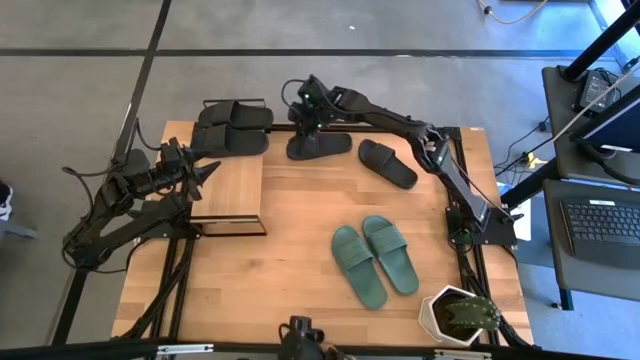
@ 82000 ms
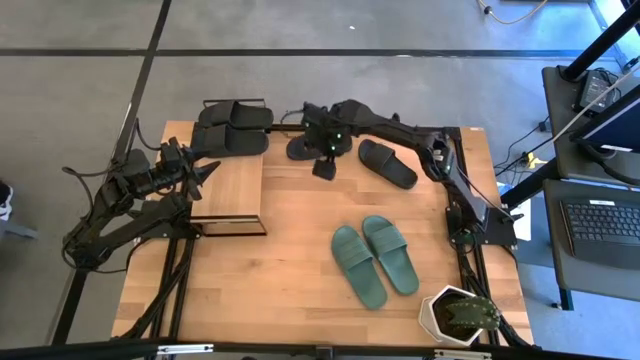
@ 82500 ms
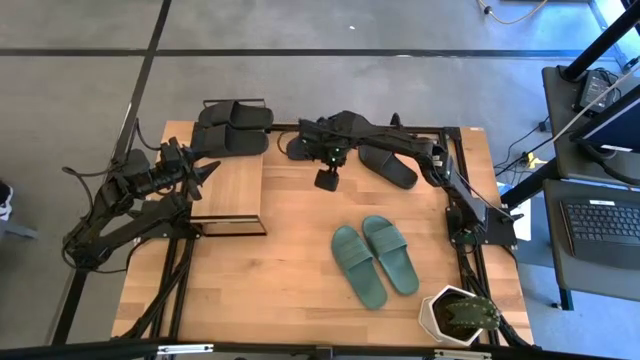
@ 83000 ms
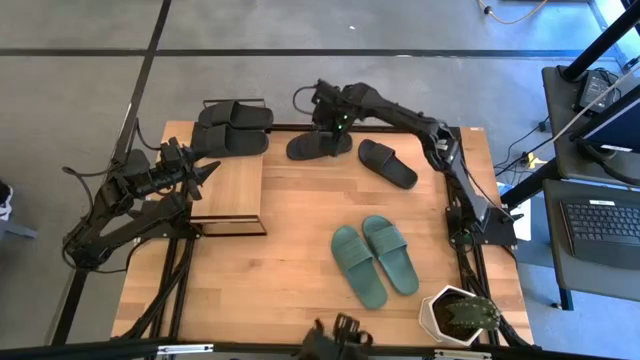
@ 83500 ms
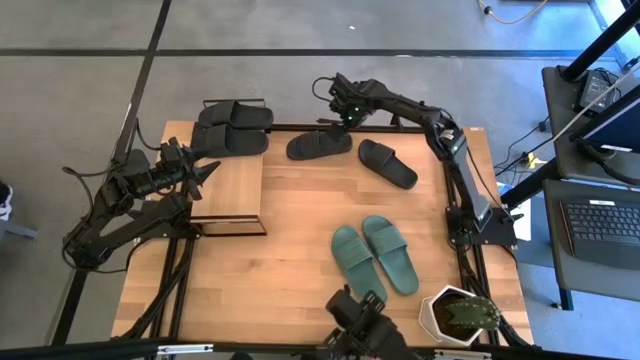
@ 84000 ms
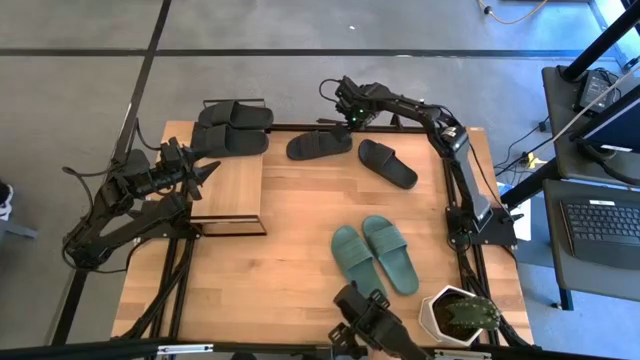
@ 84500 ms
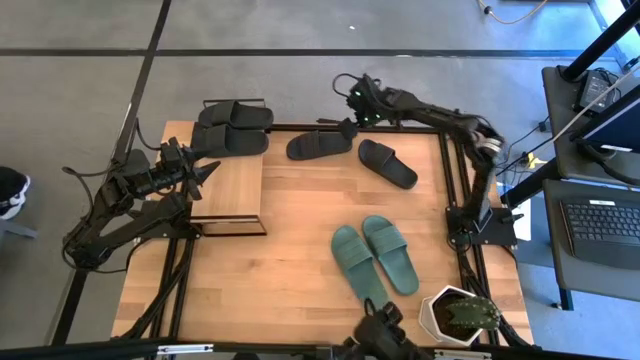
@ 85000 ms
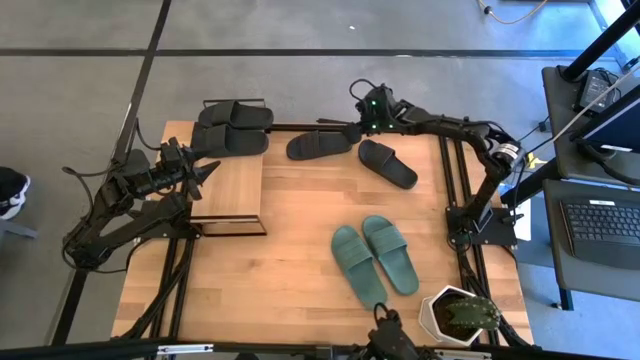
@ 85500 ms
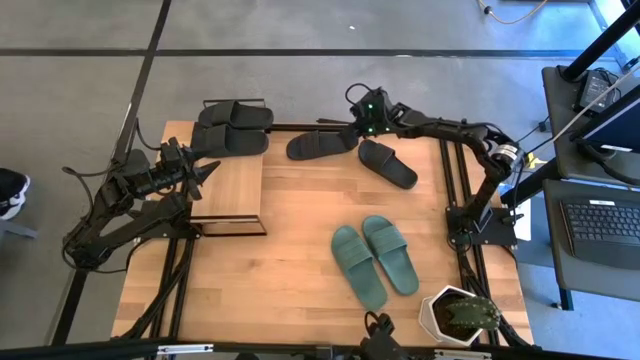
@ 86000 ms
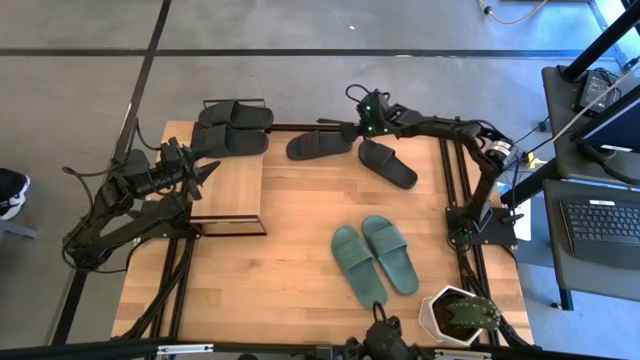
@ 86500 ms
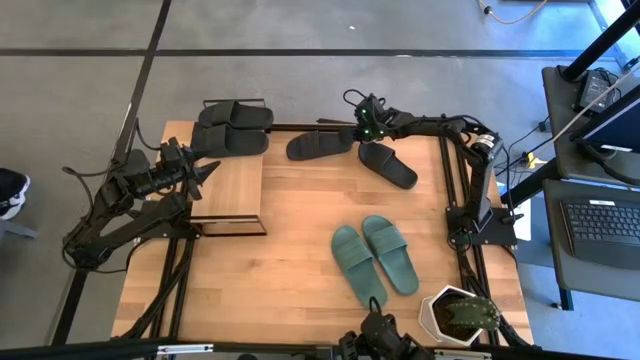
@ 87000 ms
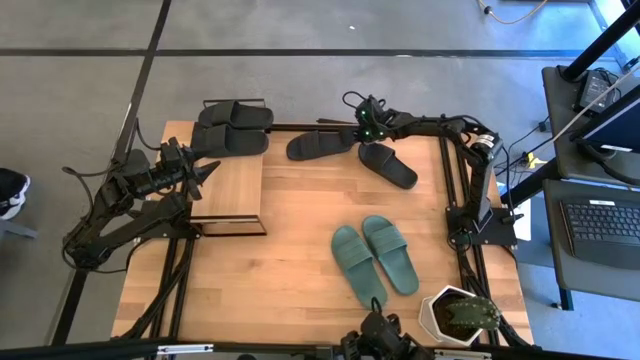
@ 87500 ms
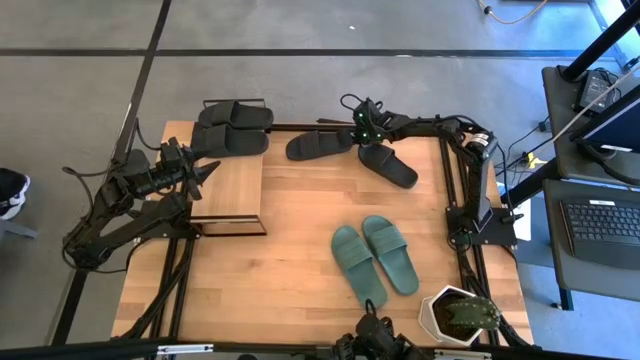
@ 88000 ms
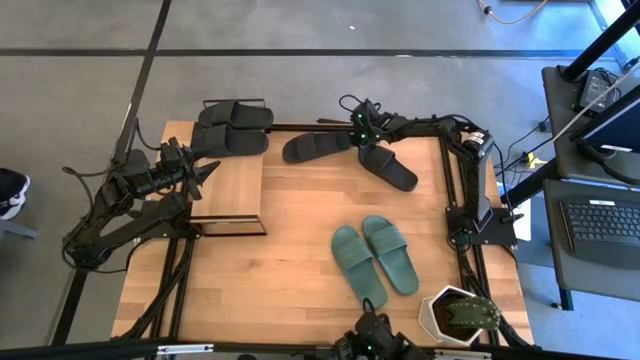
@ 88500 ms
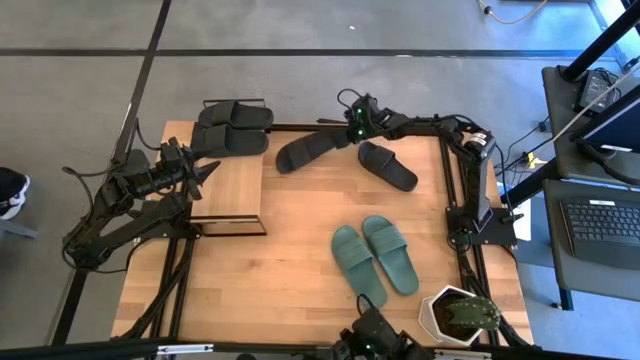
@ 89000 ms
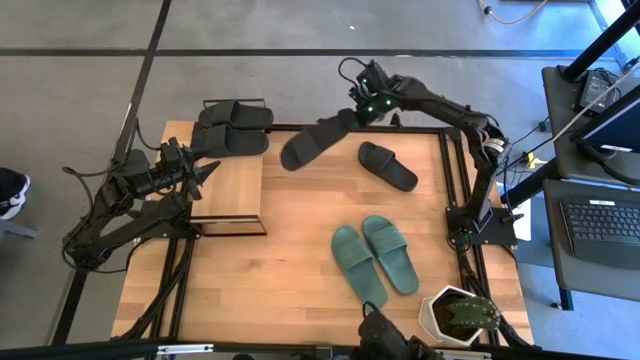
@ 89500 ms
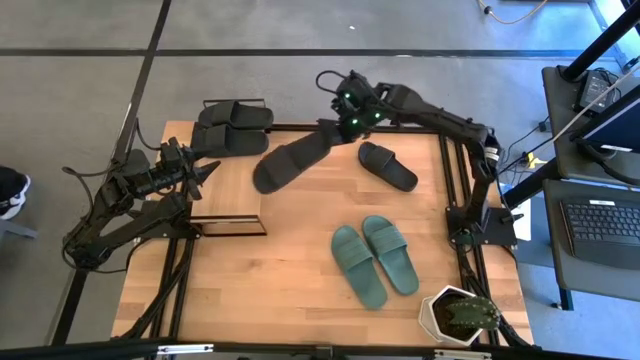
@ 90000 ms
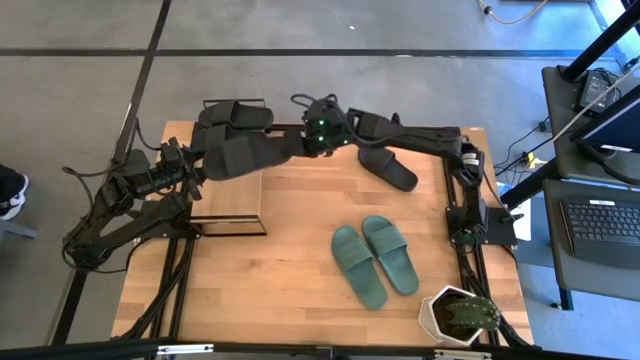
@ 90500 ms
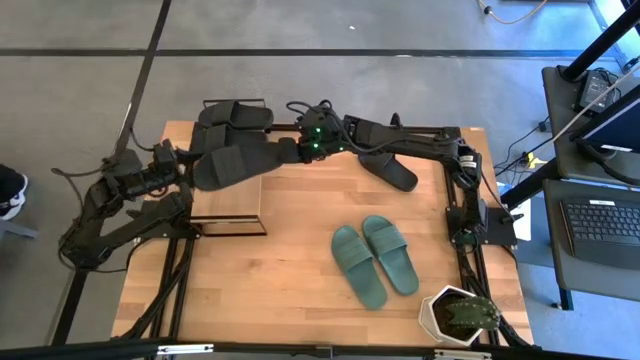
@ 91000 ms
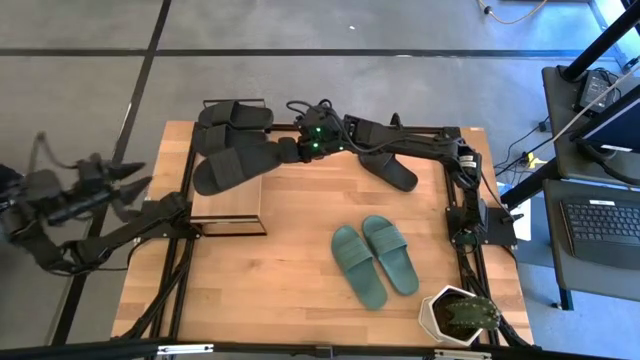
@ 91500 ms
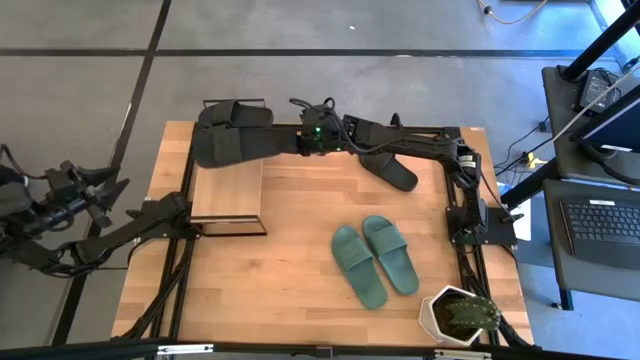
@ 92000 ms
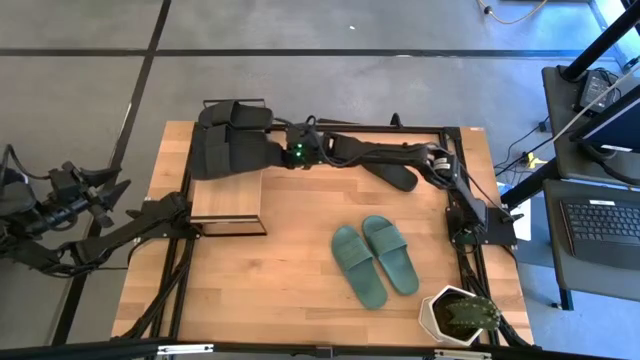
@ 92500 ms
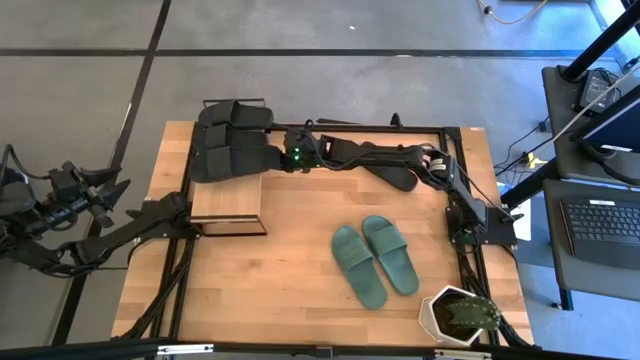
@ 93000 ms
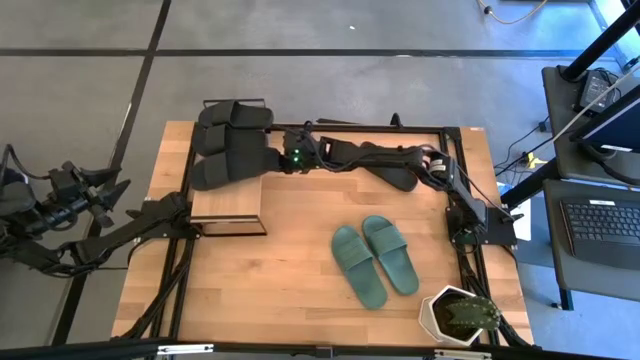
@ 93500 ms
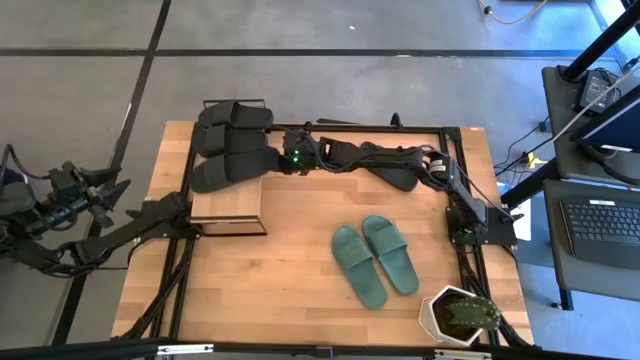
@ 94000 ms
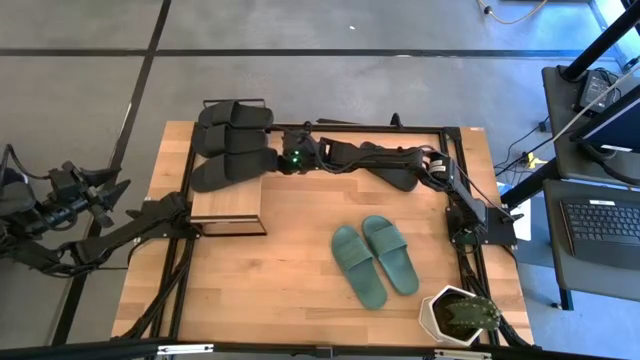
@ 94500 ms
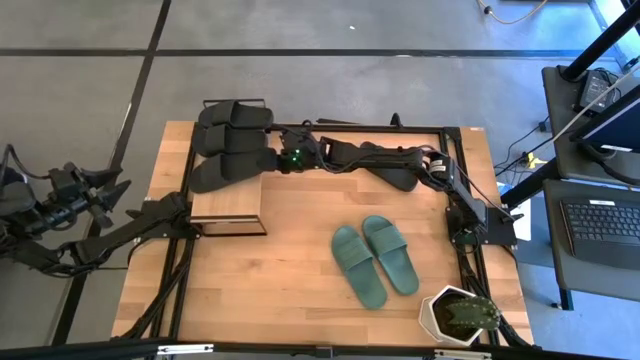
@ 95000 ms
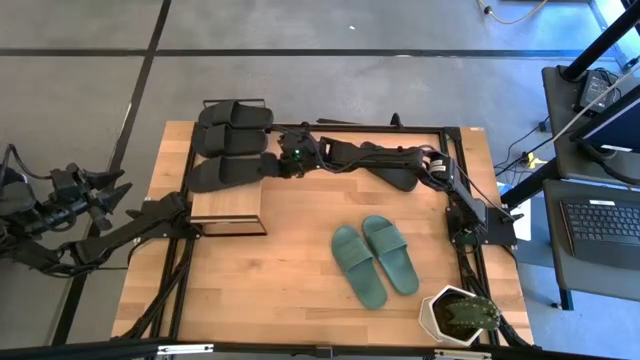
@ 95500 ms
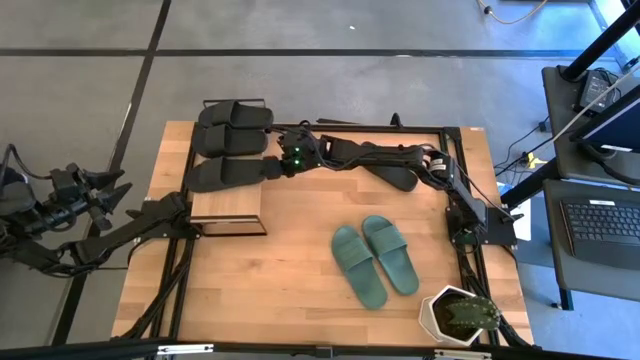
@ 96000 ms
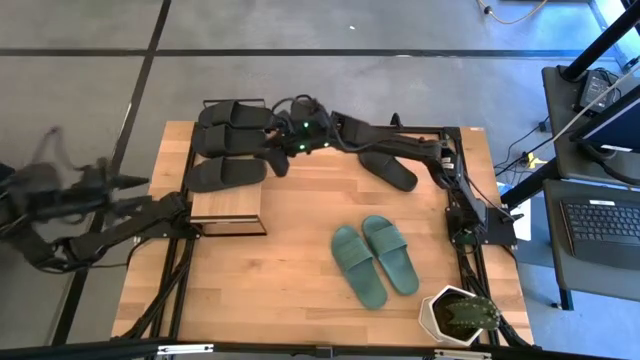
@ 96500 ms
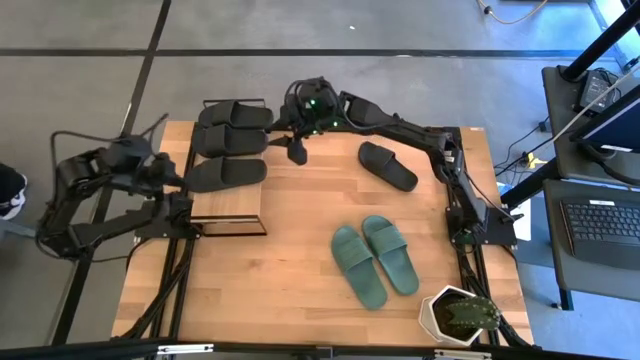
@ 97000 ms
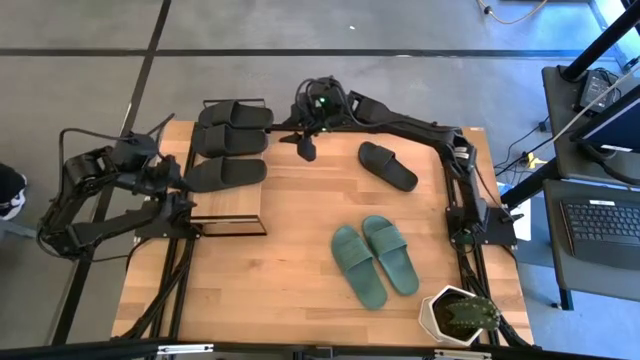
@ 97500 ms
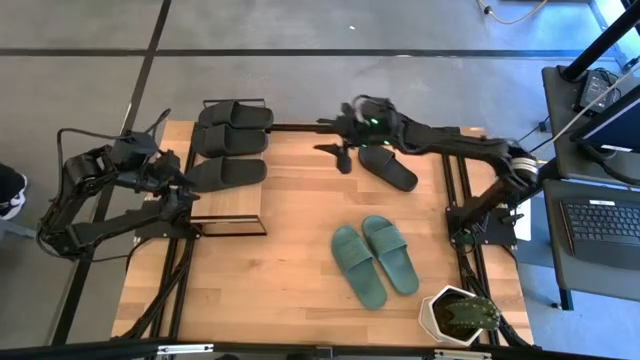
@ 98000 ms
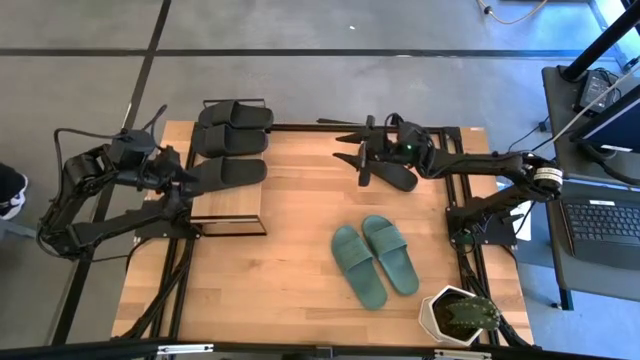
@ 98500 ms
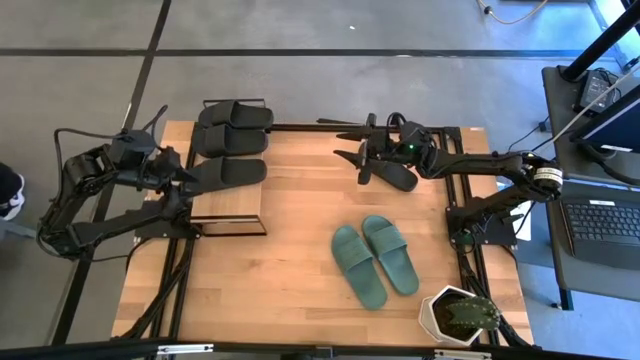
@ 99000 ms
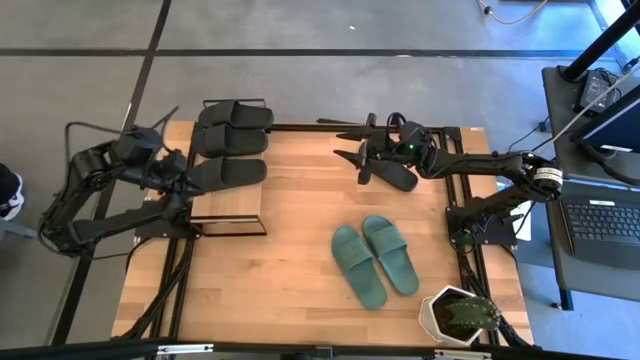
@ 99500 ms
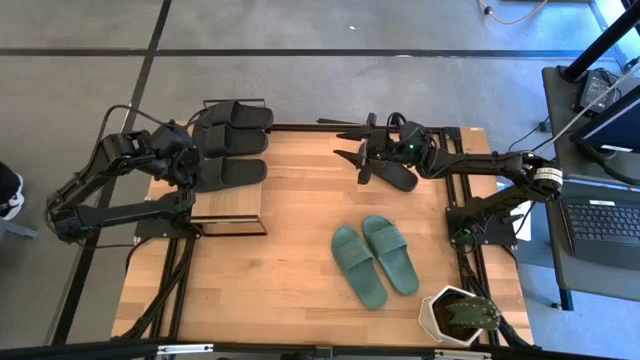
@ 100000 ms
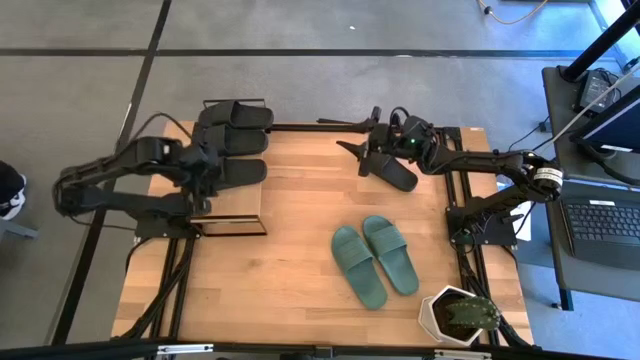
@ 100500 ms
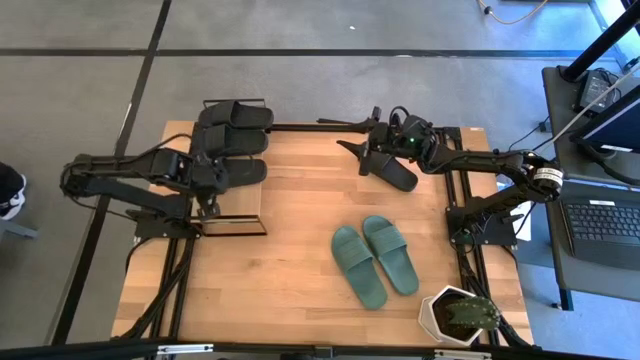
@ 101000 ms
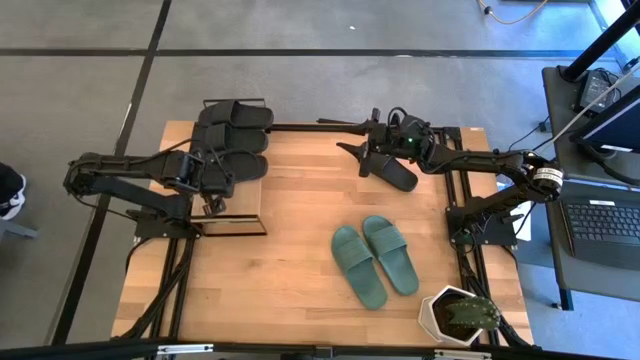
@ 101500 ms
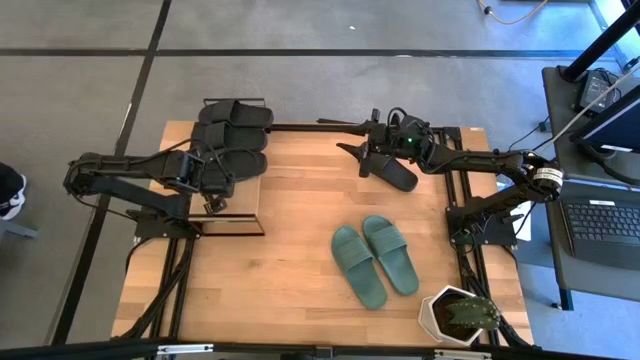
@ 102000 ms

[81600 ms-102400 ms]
Task: Pick and place slides into the shelf
Put the black slipper on the shelf
